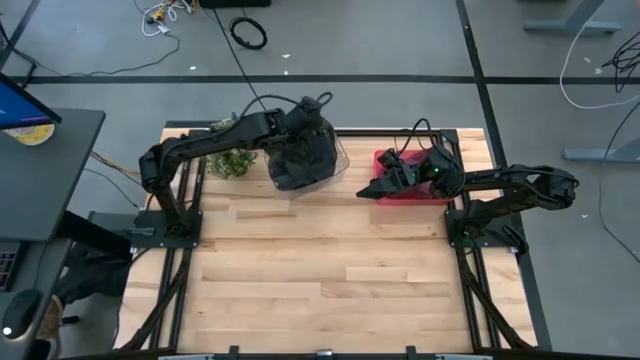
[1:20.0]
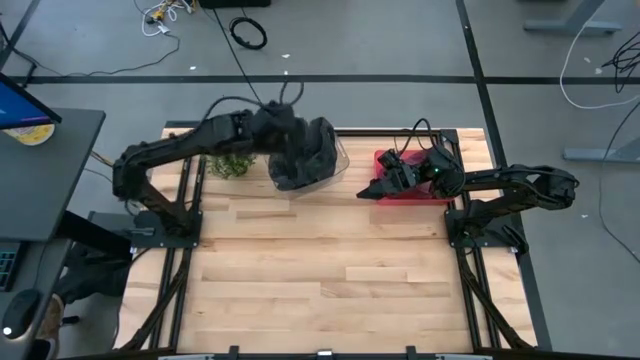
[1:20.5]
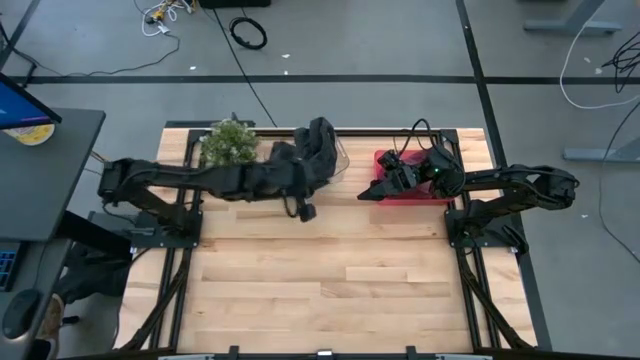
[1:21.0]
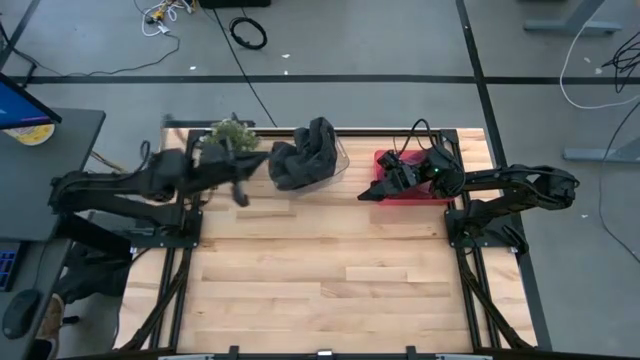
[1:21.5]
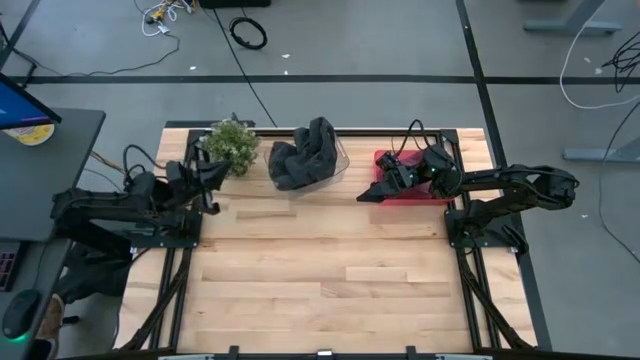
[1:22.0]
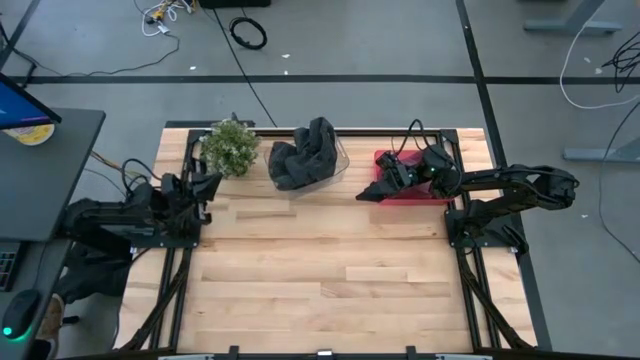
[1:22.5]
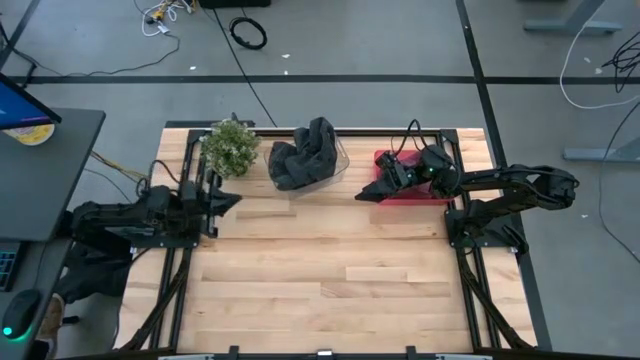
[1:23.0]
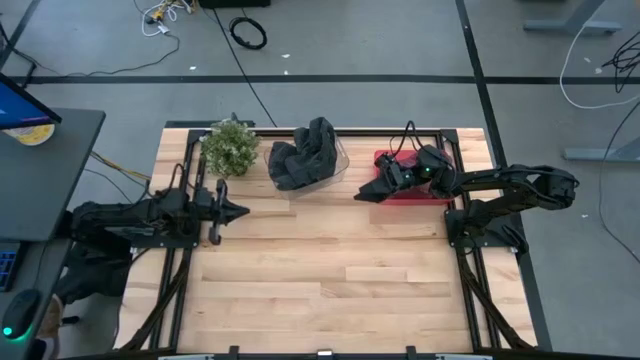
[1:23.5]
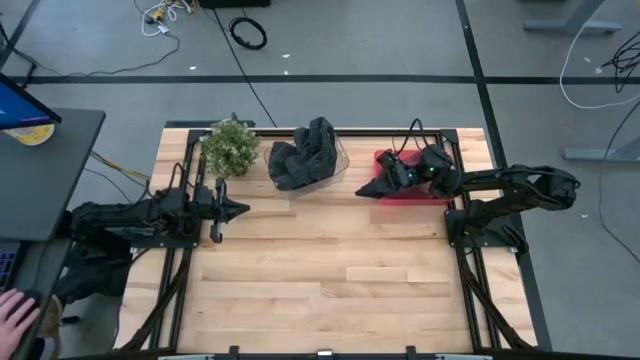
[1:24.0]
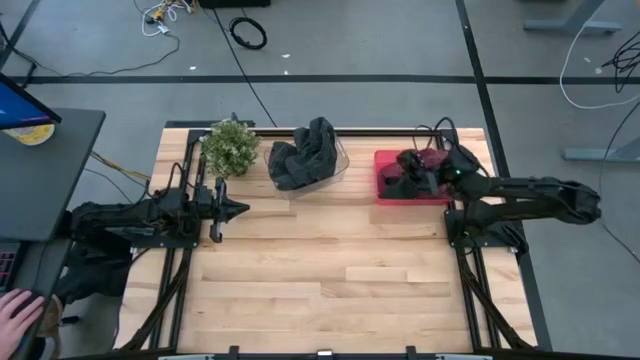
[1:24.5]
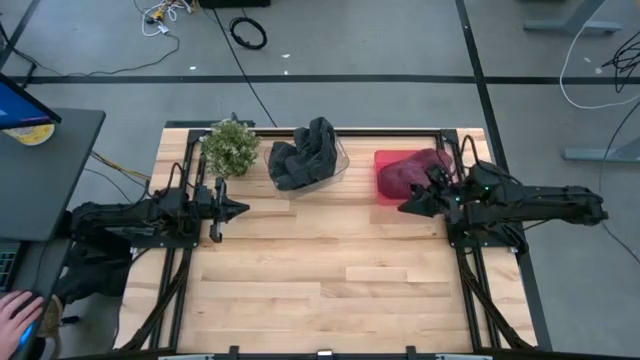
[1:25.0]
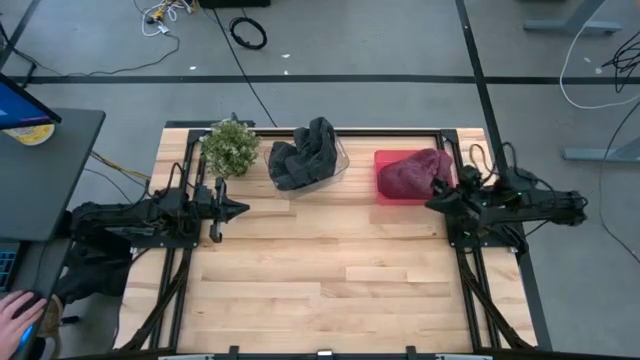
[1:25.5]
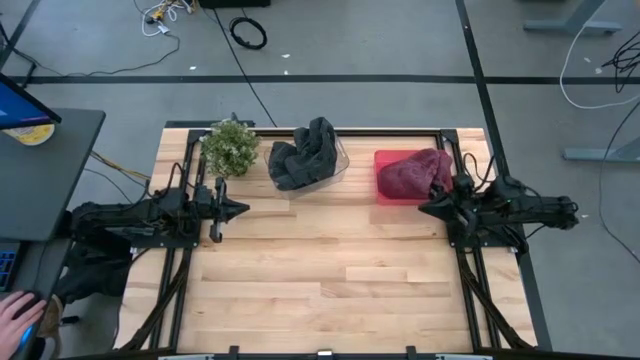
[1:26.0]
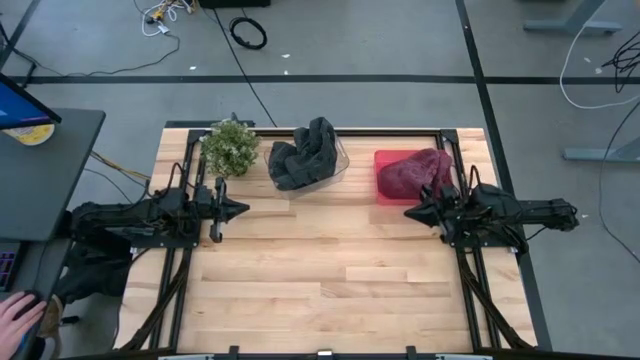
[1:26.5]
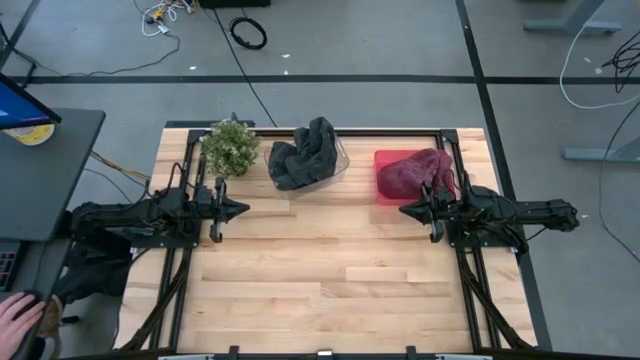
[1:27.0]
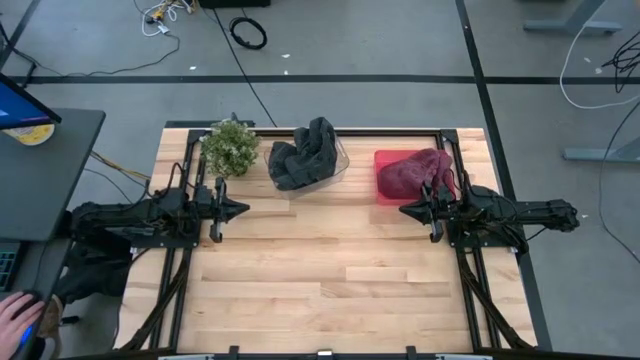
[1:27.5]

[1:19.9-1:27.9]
Task: Pick & Place hat
Return to Home Position

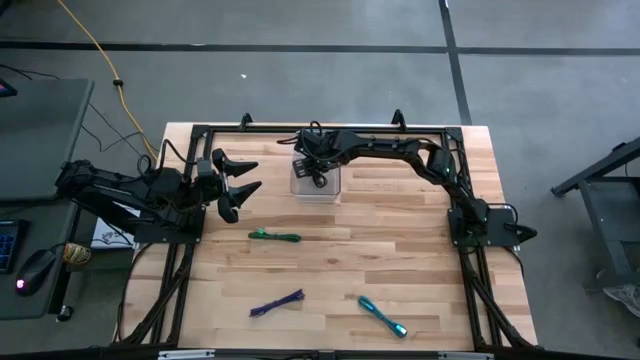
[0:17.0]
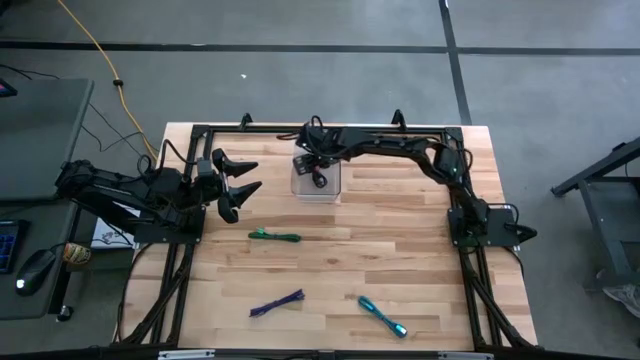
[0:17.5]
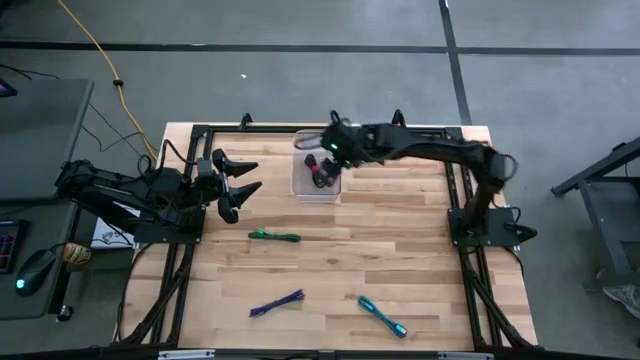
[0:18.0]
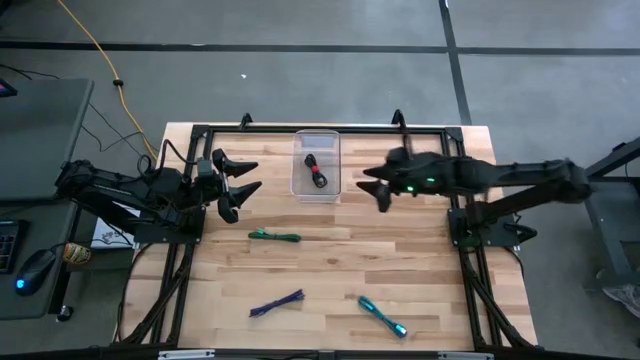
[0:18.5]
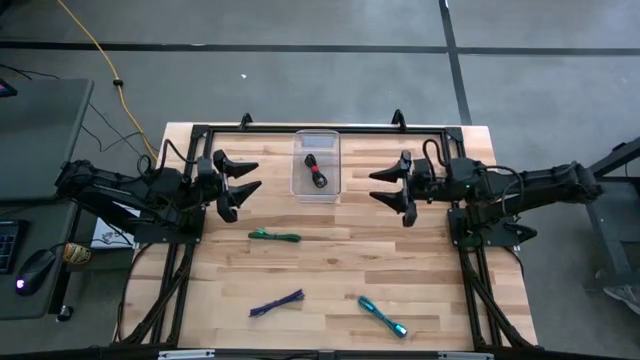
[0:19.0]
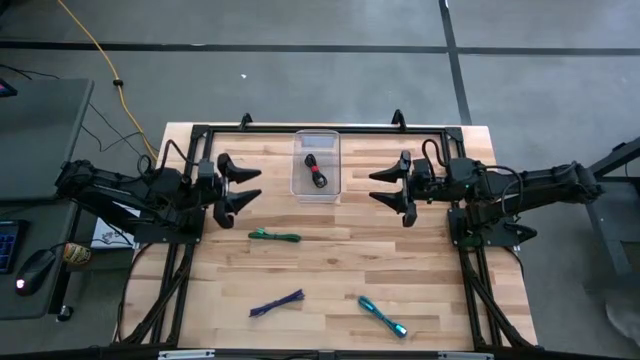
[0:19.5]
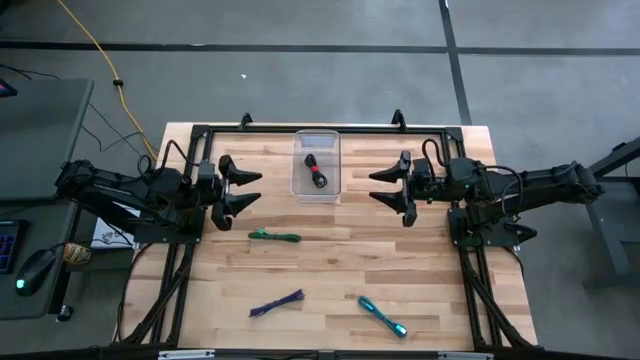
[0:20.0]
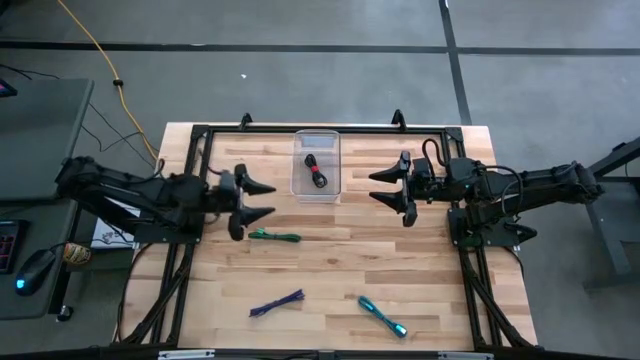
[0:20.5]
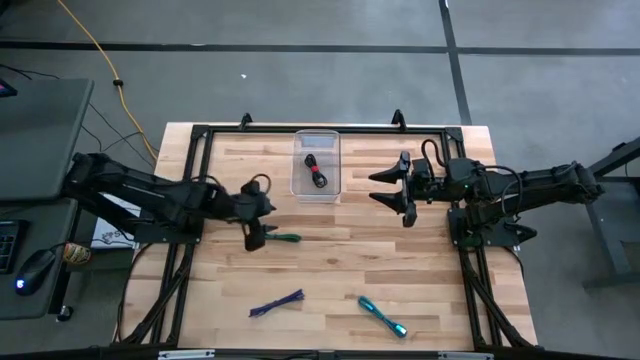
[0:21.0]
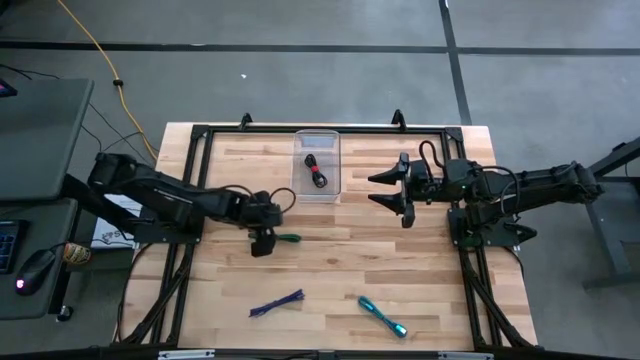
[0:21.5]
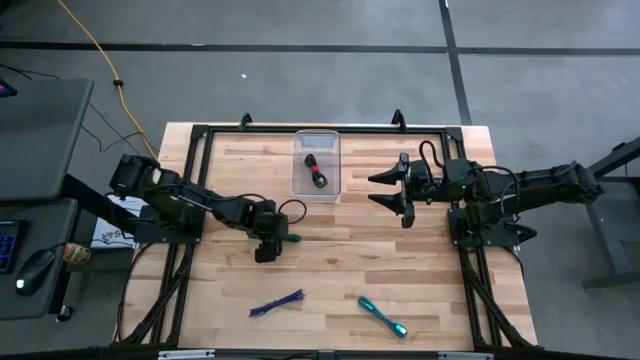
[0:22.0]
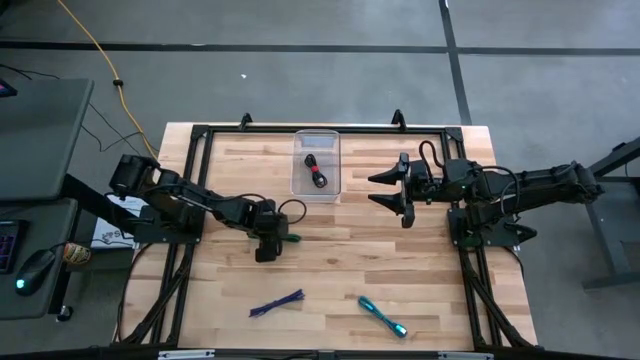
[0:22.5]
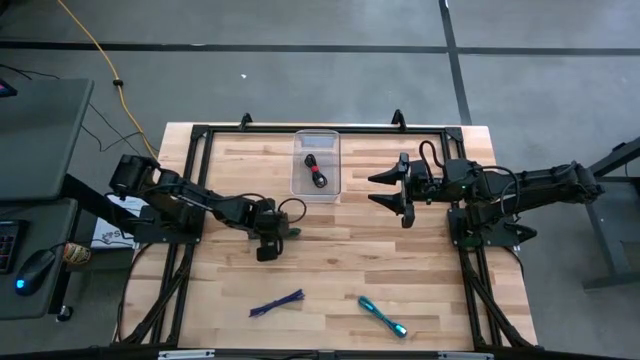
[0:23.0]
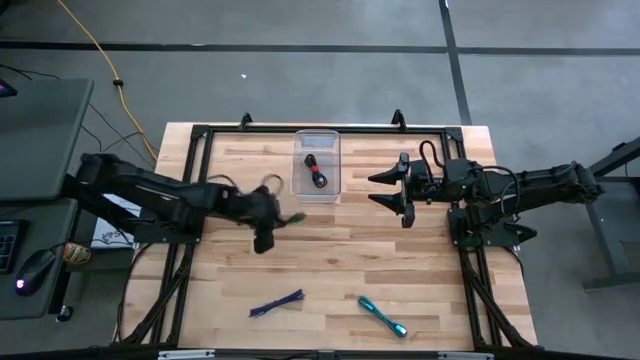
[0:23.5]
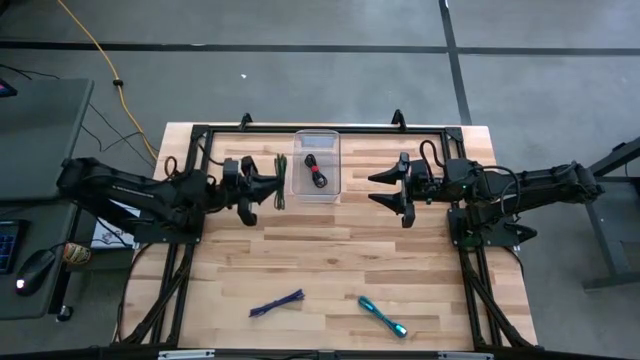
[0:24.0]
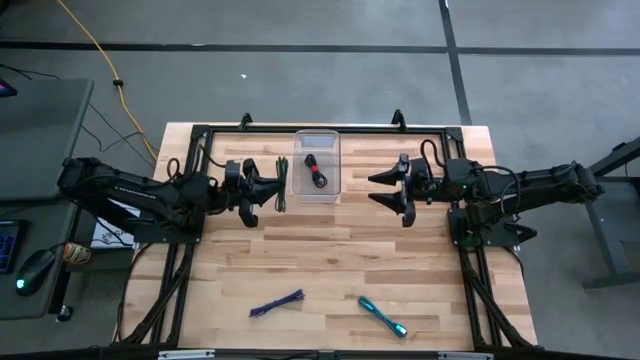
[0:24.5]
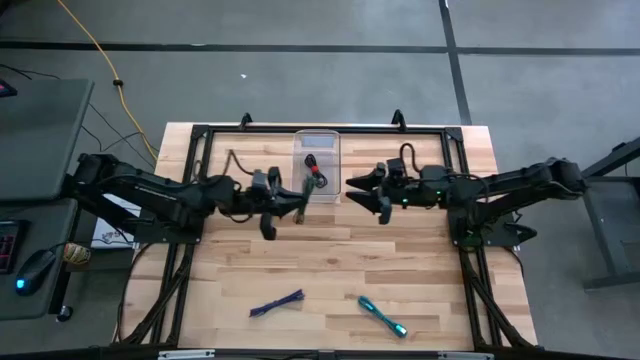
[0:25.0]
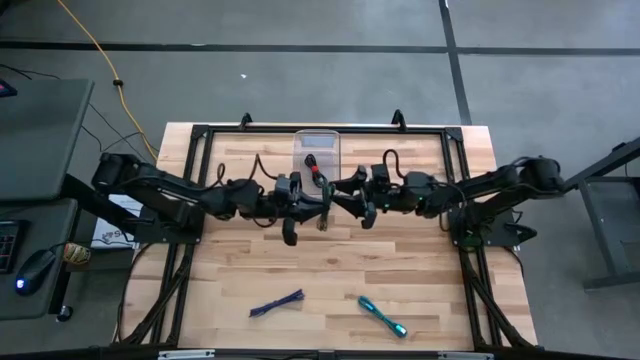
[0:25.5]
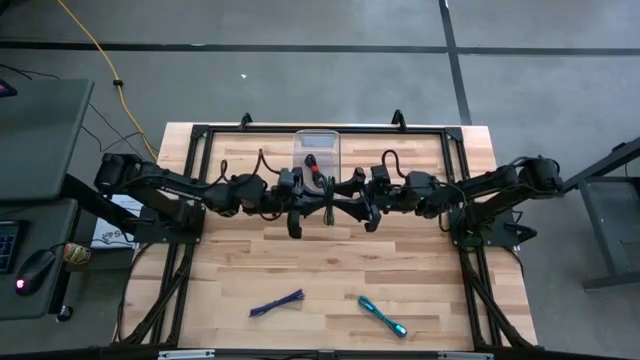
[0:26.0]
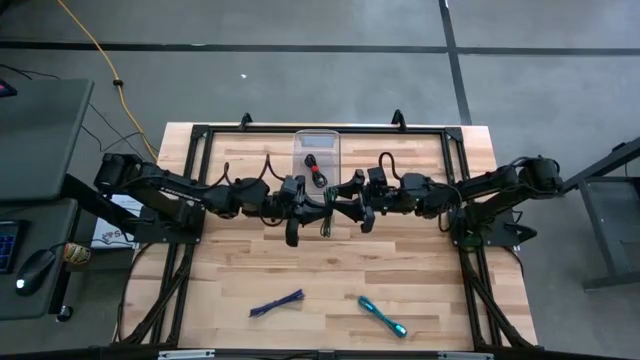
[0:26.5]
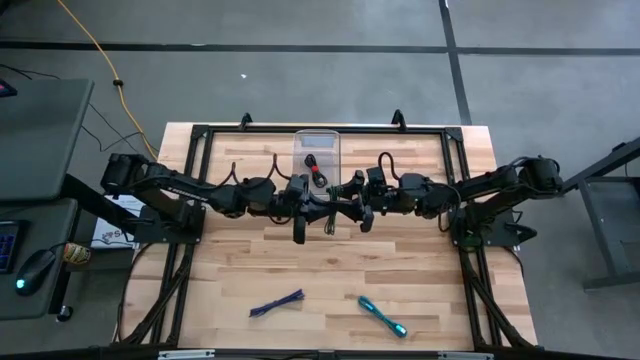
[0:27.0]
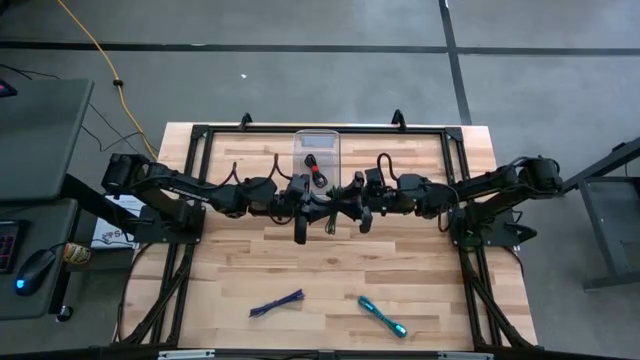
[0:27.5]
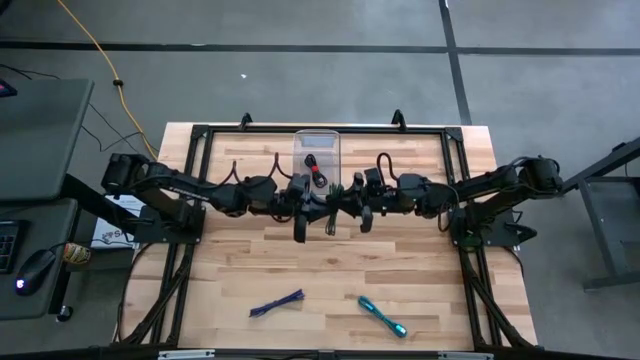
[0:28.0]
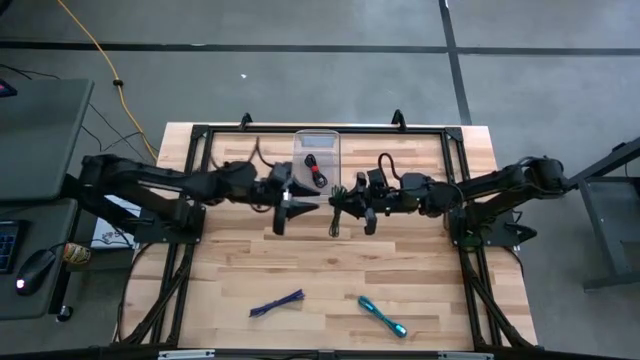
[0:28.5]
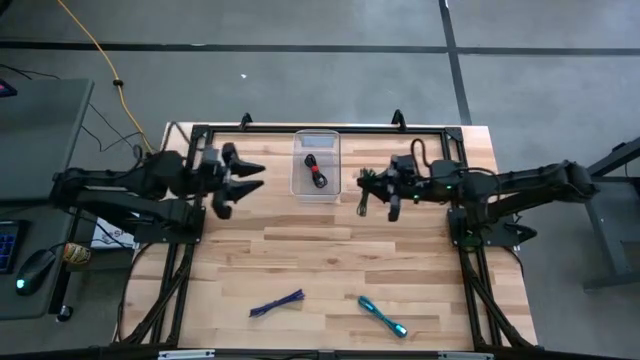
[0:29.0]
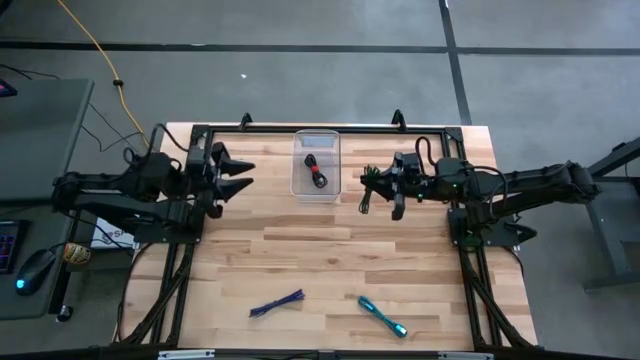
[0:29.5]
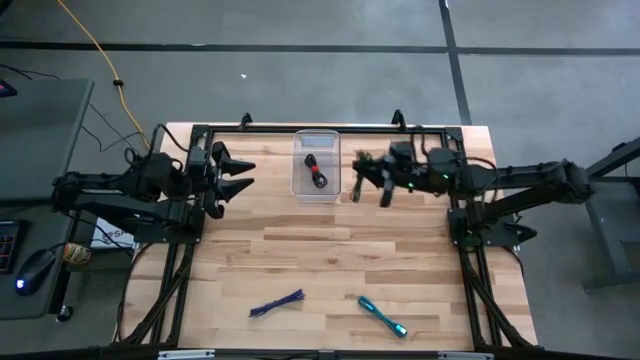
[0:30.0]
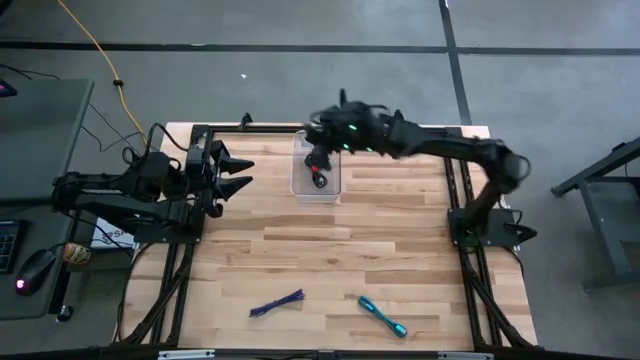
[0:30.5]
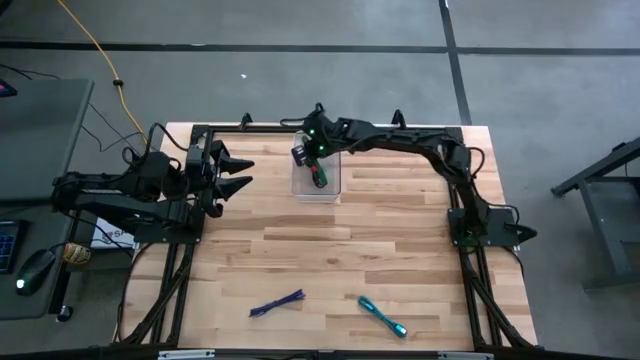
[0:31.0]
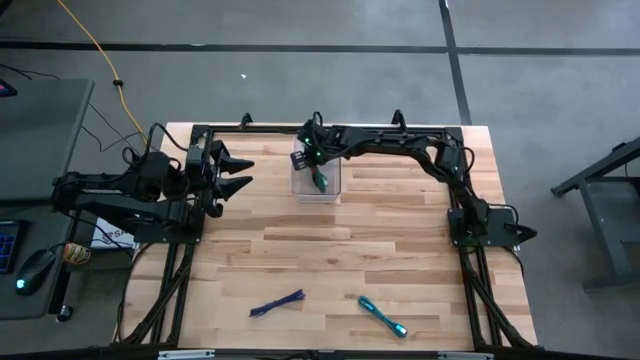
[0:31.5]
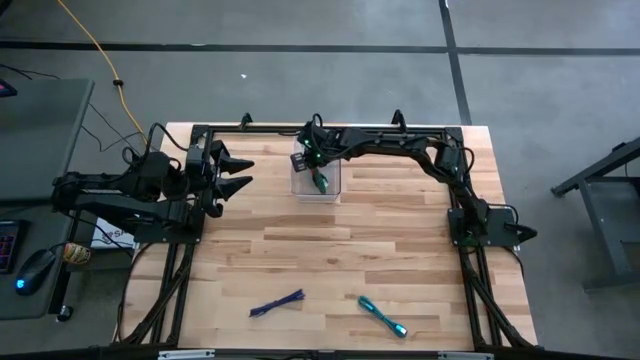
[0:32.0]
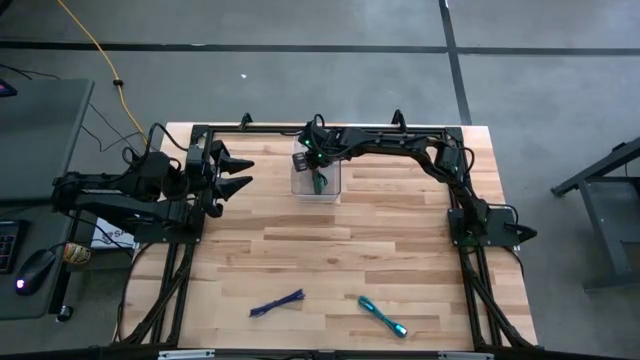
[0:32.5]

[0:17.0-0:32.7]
Task: Pick and place USB-C Cables
Put the green charger cable into the transparent bin
